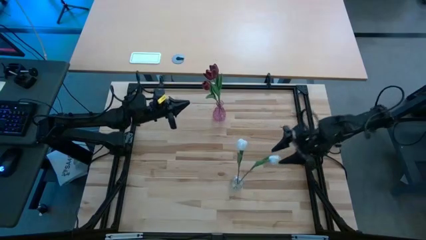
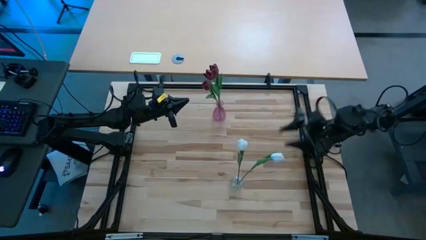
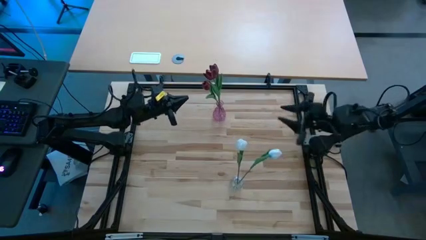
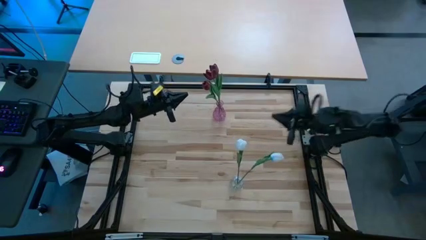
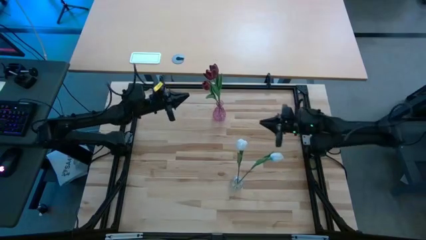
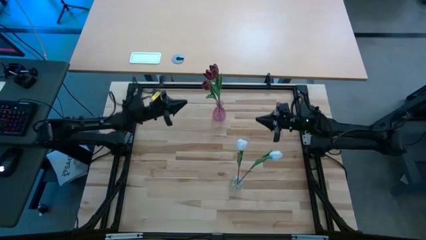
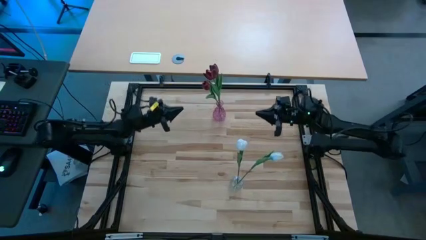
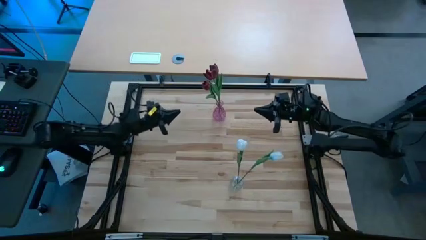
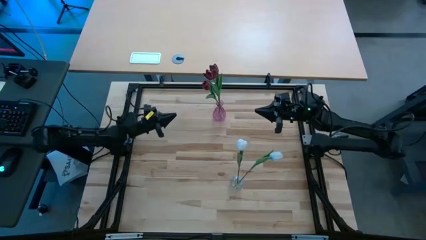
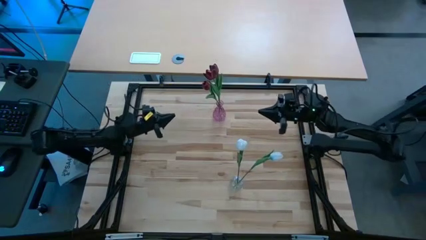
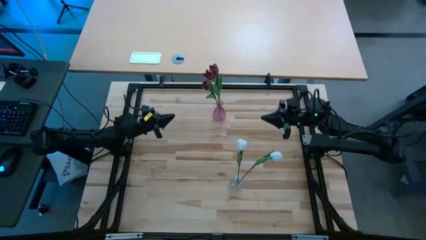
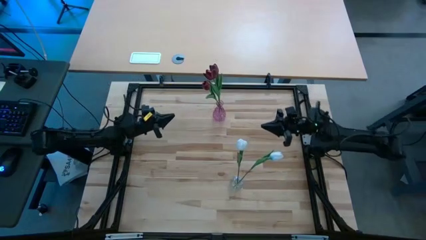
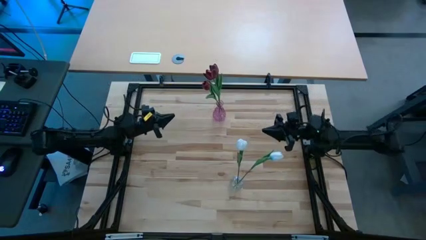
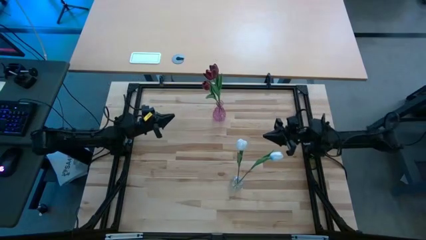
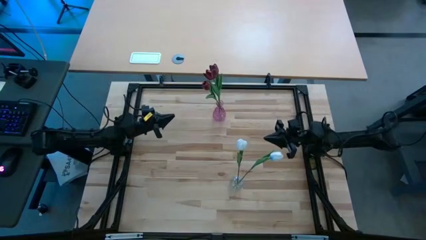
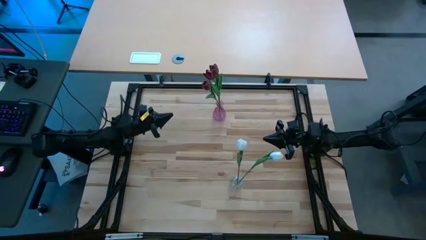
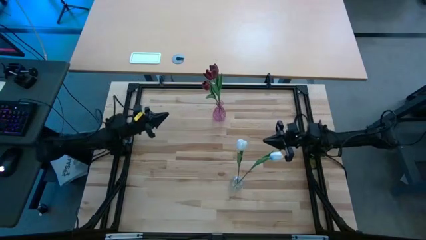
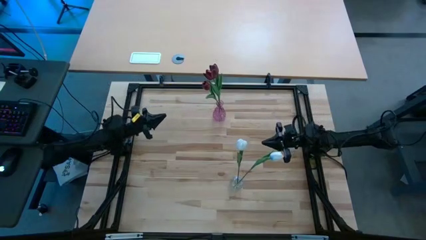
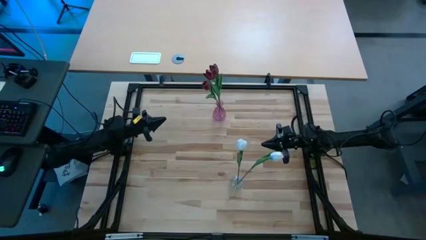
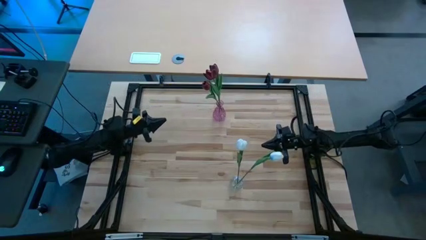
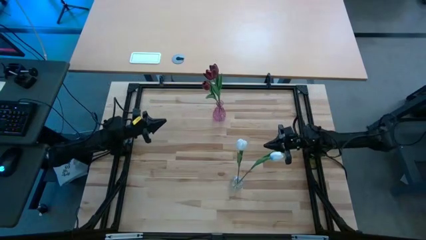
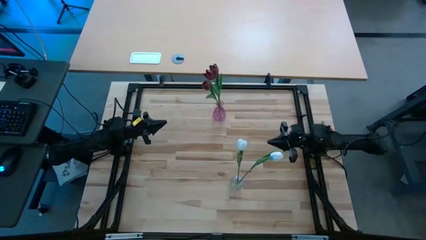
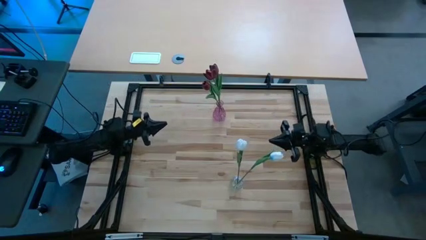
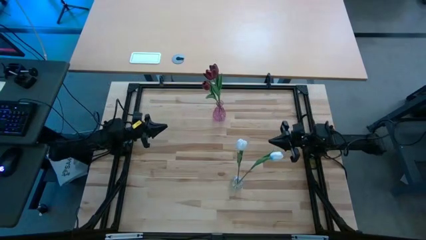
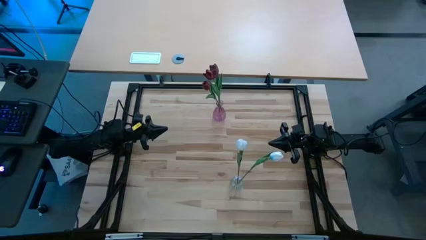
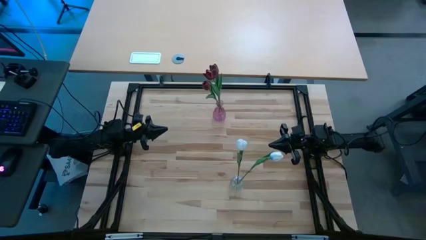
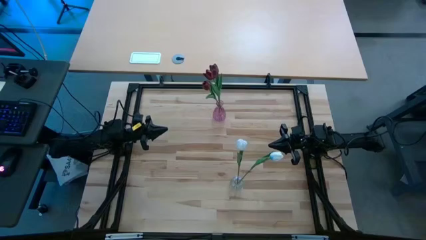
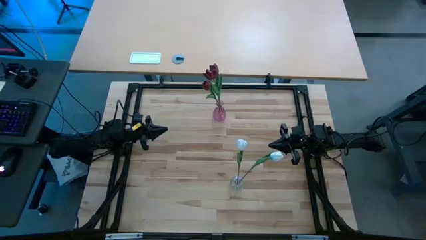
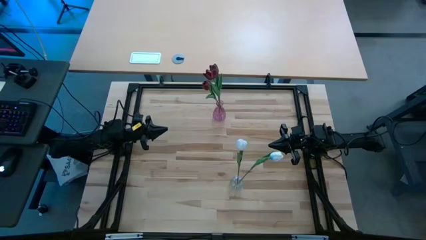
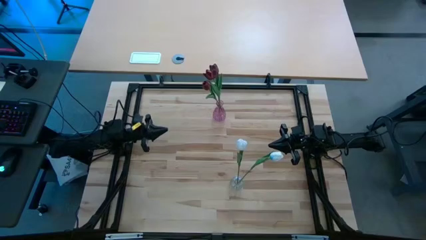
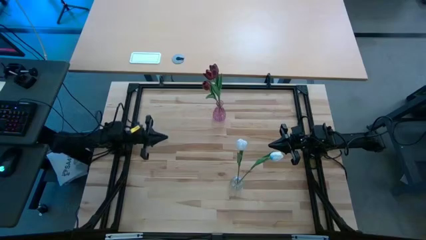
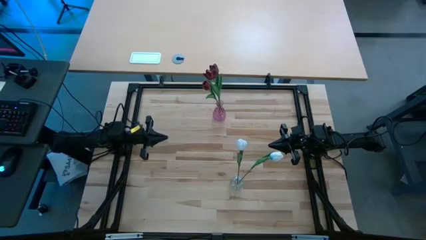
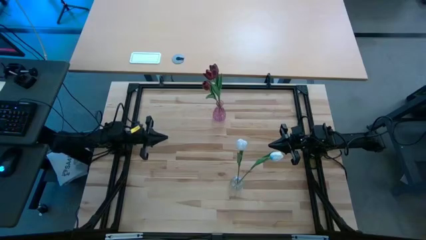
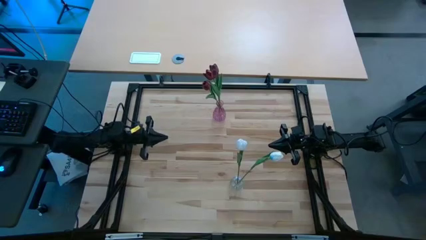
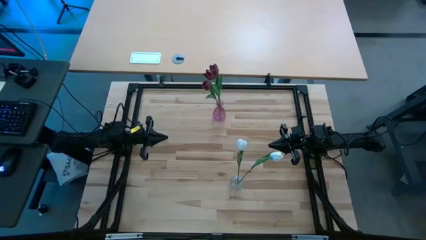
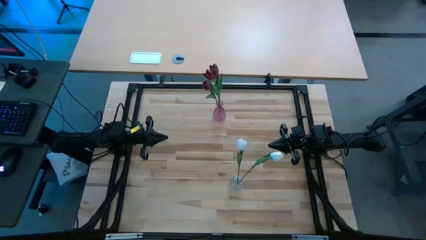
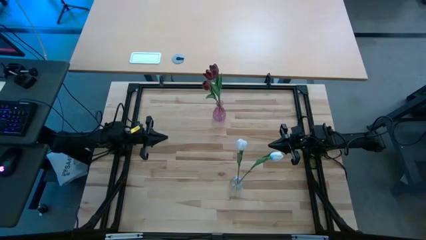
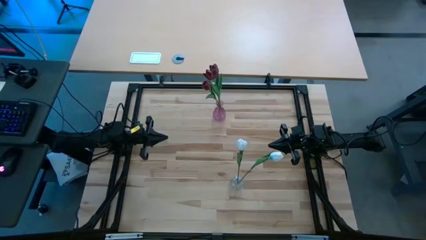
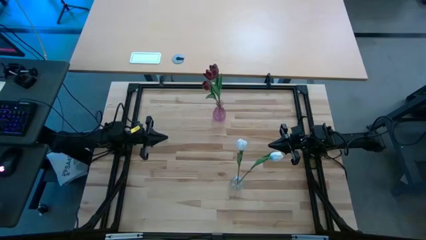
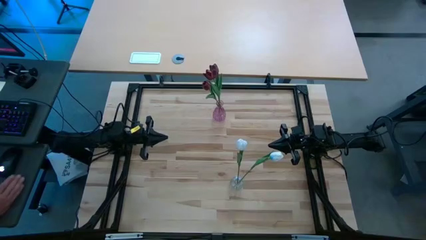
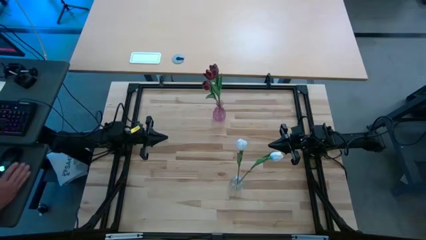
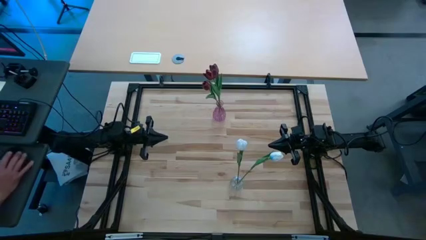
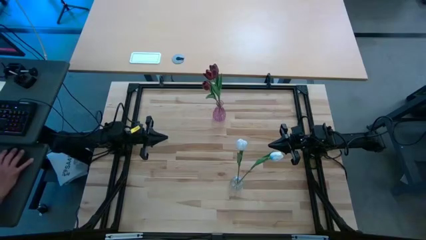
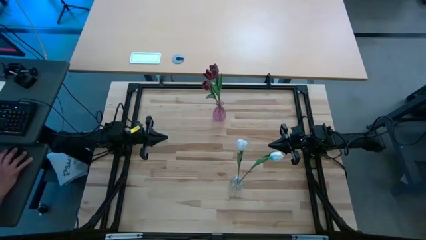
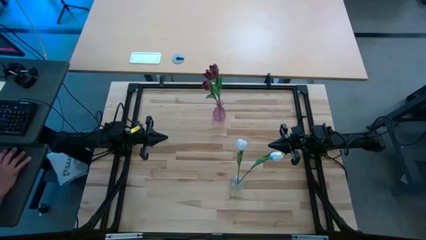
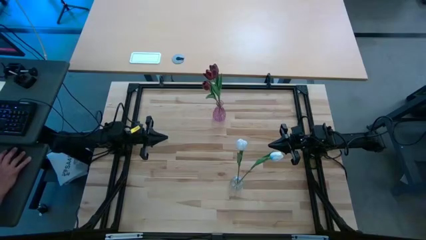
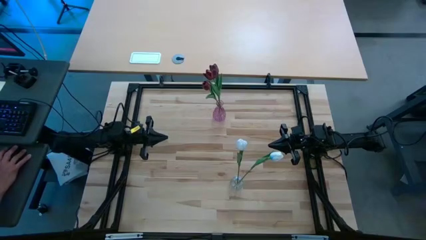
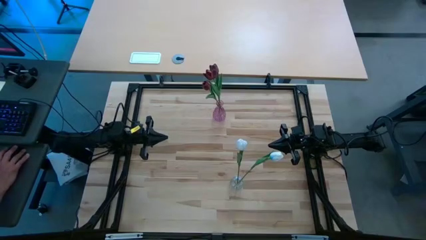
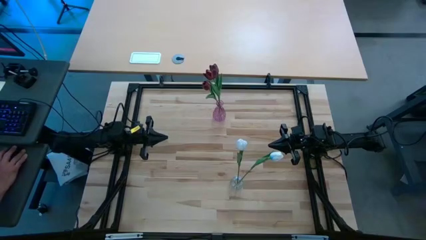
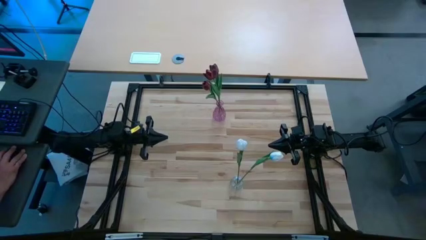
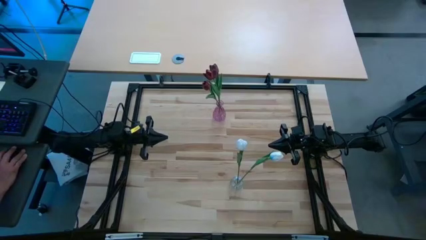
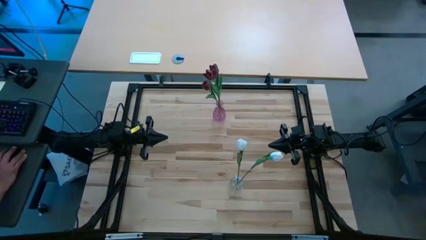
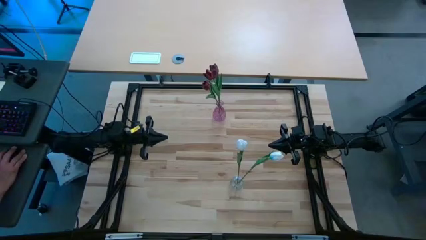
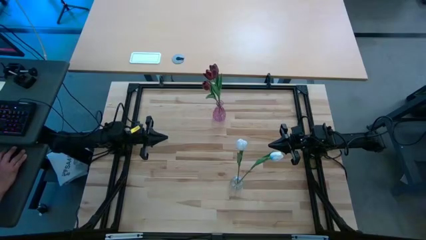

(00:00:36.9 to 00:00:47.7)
Task: Sort flowers into vase by color
Return to Home Position

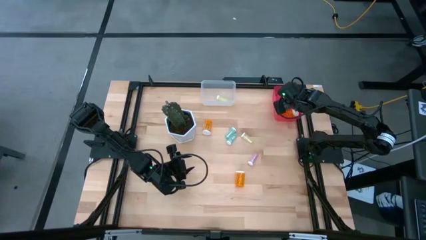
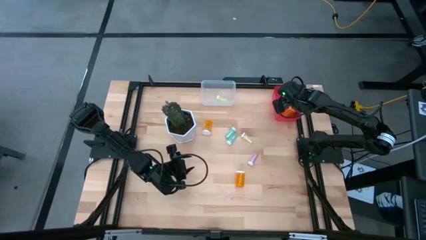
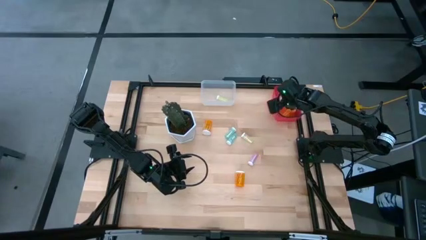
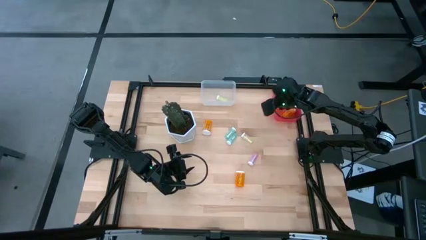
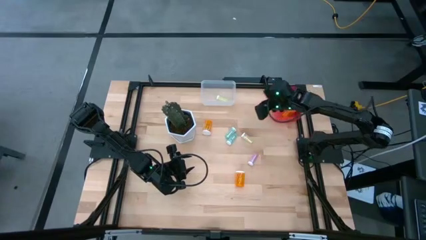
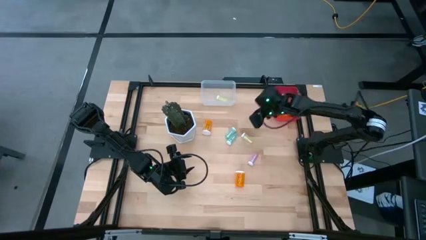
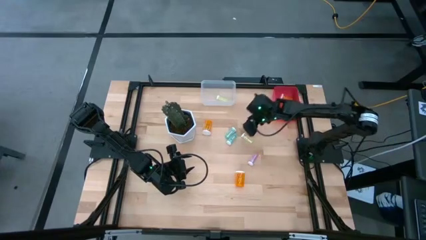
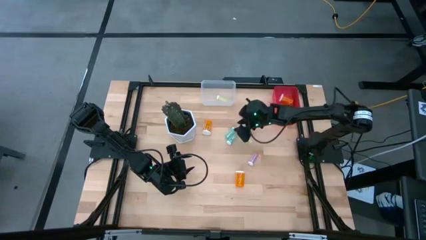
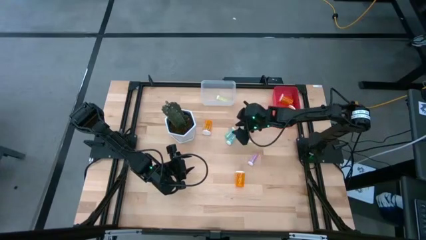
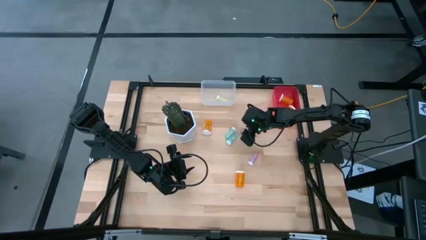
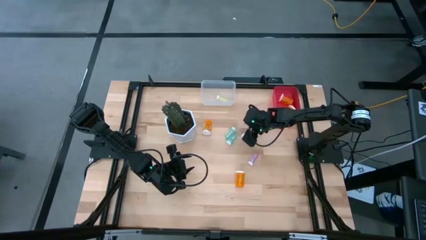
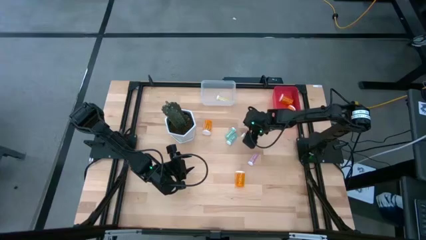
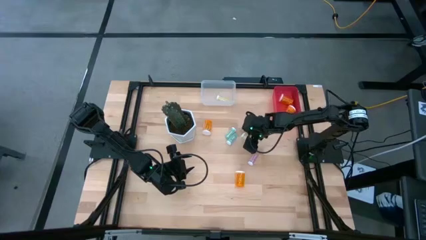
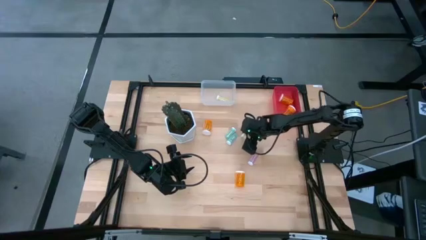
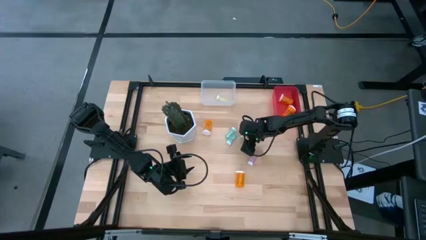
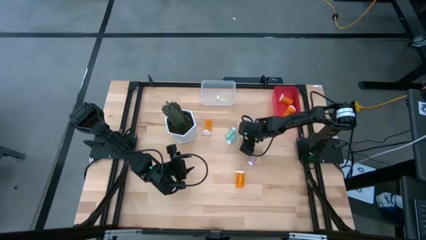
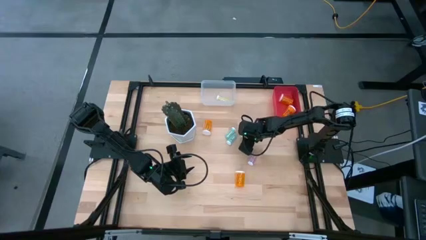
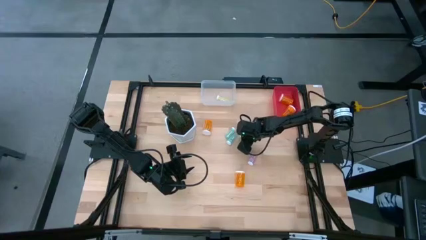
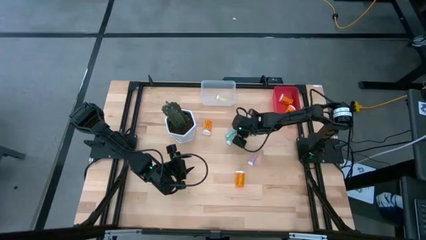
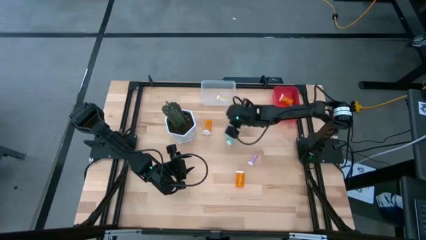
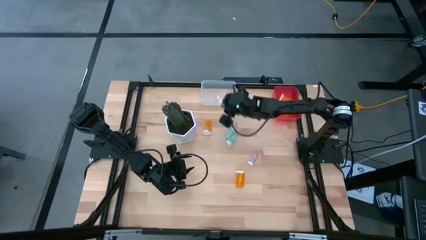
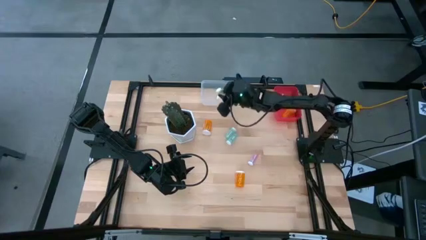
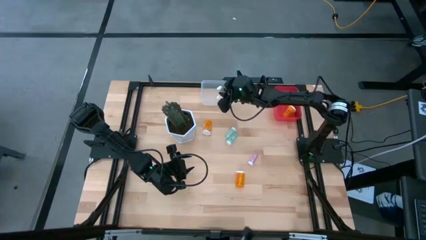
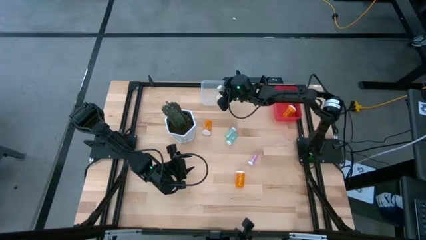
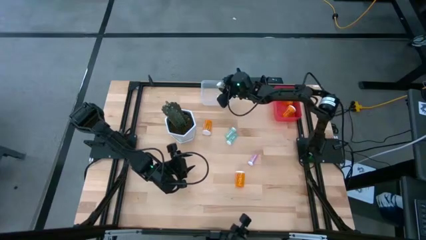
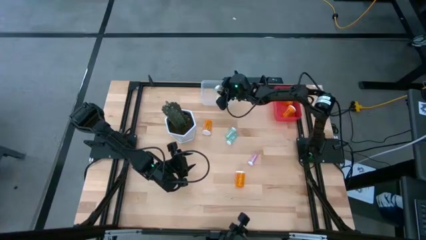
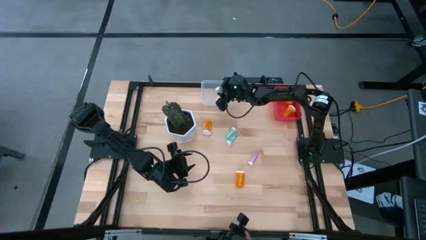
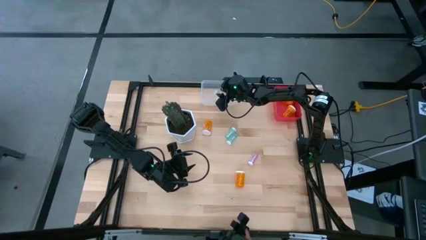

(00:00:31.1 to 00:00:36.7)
Task: Pick and place medicine bottles into bin by pill shape (circle, oval)
Put the small yellow pill bottle into the transparent bin
